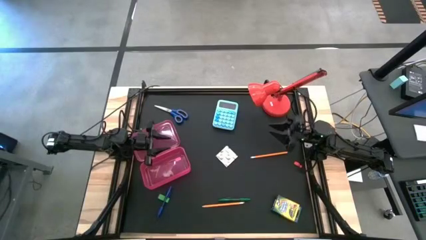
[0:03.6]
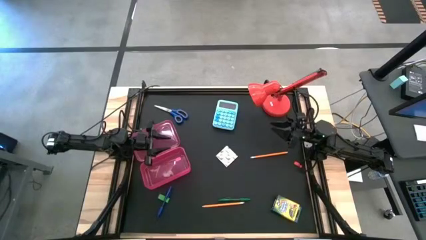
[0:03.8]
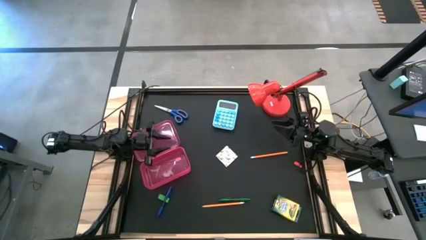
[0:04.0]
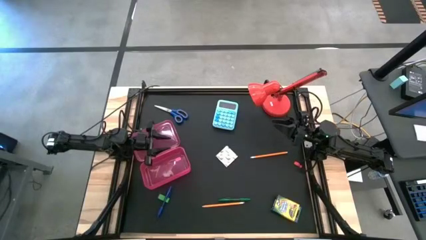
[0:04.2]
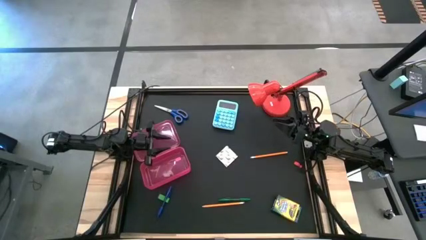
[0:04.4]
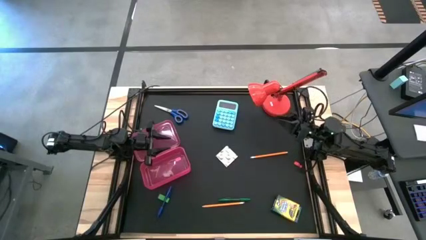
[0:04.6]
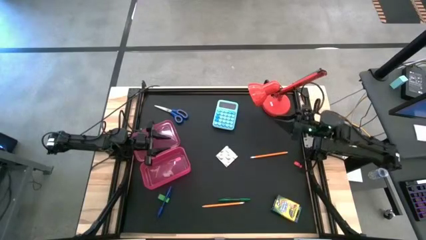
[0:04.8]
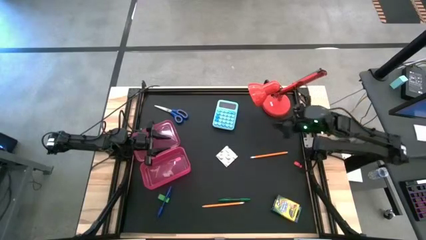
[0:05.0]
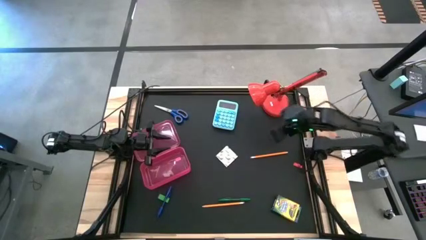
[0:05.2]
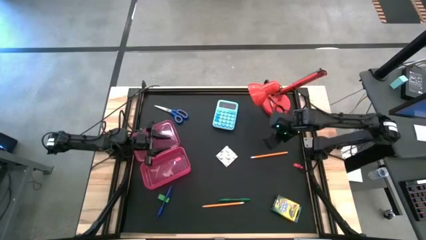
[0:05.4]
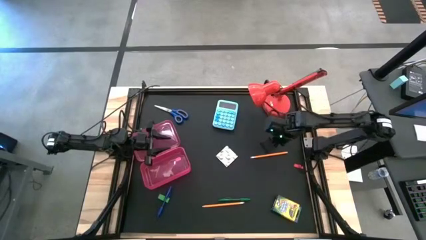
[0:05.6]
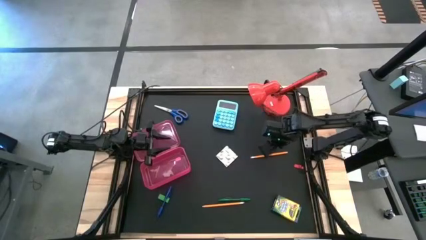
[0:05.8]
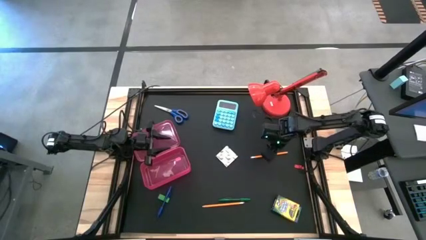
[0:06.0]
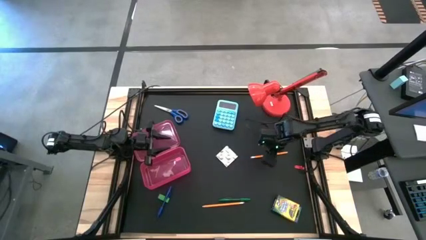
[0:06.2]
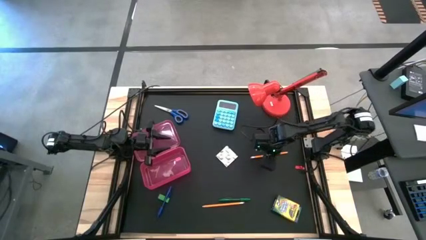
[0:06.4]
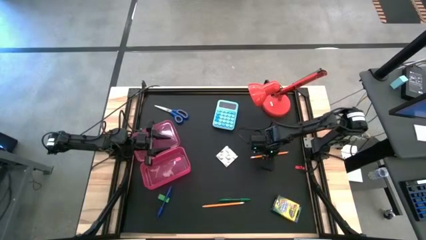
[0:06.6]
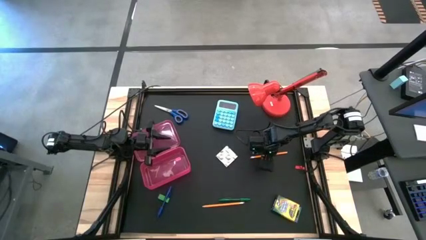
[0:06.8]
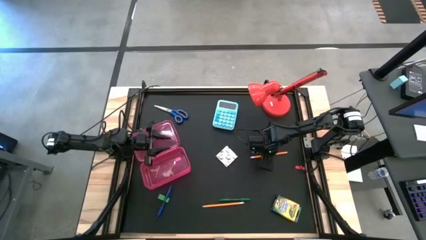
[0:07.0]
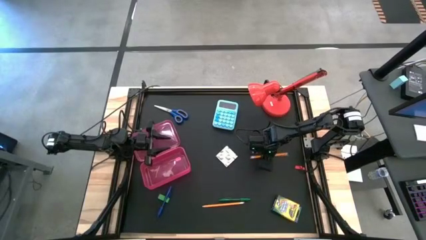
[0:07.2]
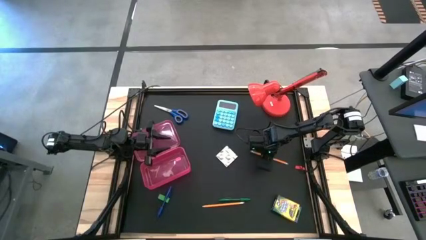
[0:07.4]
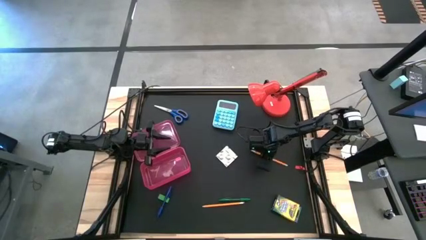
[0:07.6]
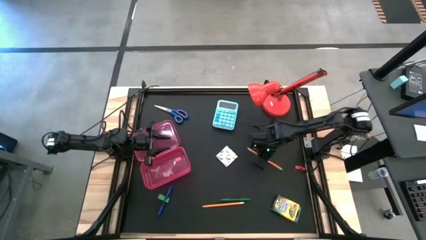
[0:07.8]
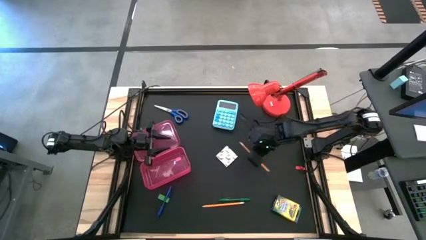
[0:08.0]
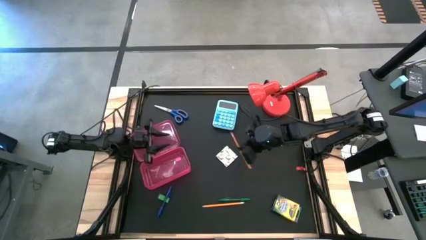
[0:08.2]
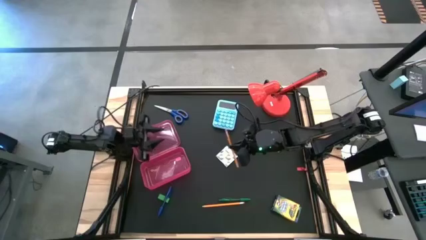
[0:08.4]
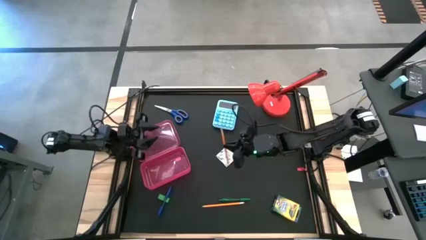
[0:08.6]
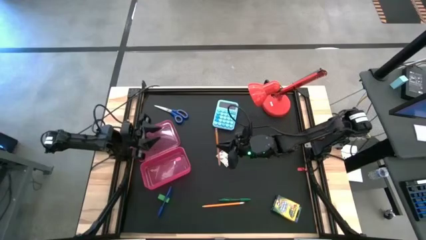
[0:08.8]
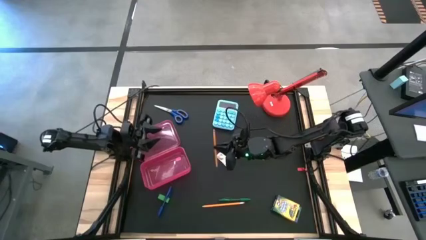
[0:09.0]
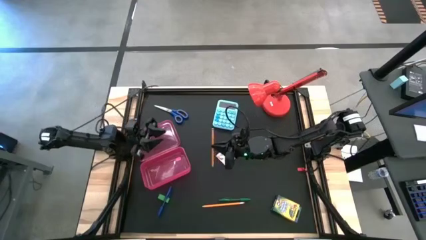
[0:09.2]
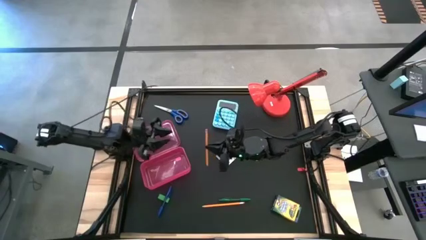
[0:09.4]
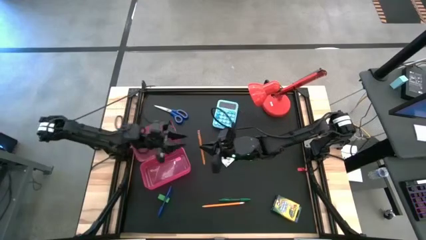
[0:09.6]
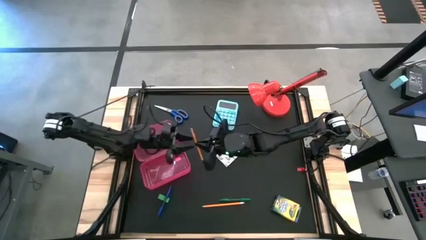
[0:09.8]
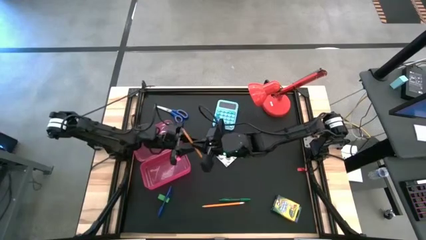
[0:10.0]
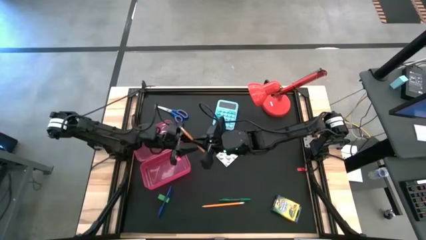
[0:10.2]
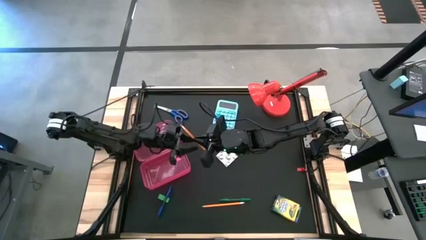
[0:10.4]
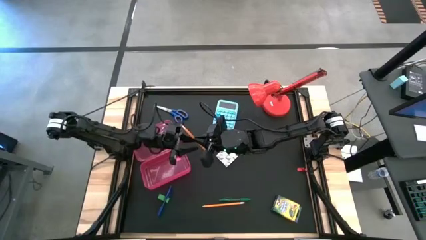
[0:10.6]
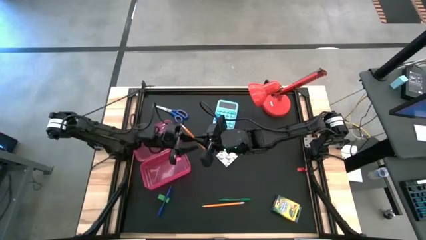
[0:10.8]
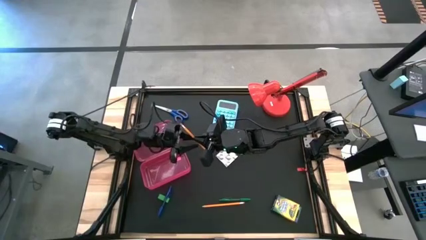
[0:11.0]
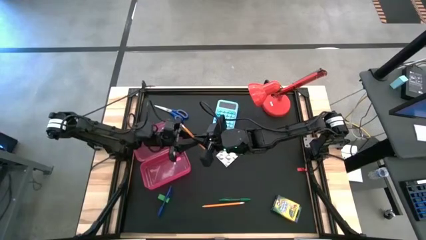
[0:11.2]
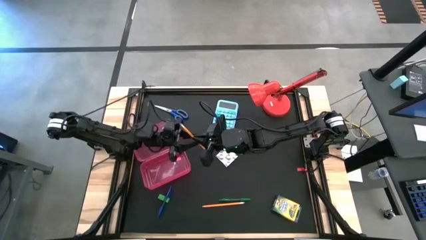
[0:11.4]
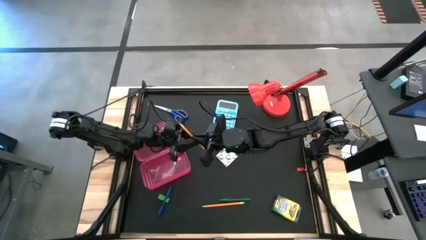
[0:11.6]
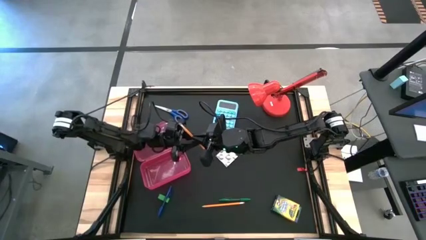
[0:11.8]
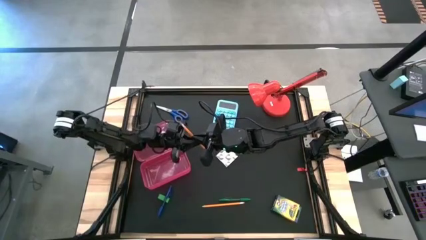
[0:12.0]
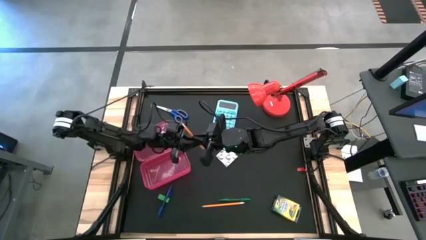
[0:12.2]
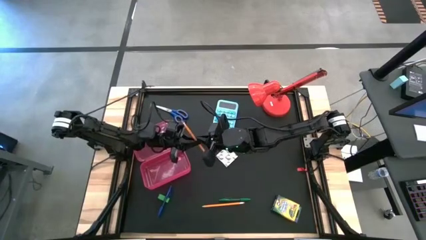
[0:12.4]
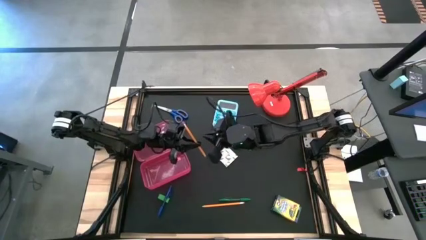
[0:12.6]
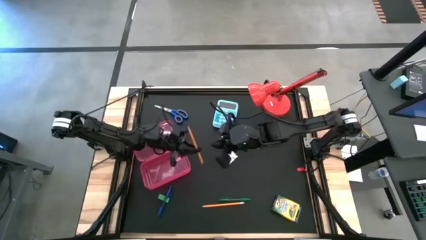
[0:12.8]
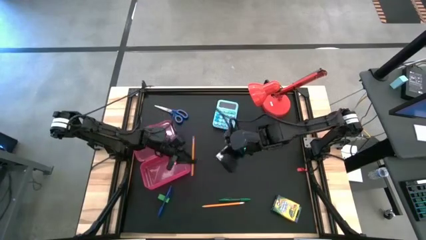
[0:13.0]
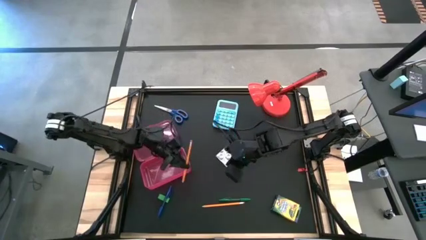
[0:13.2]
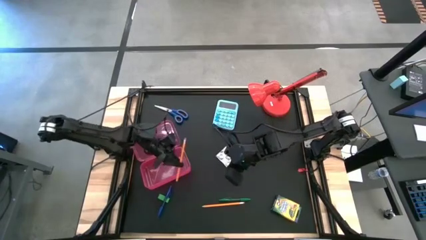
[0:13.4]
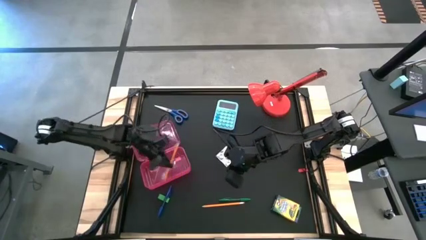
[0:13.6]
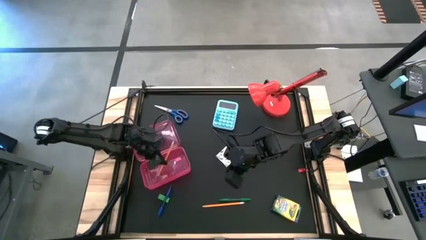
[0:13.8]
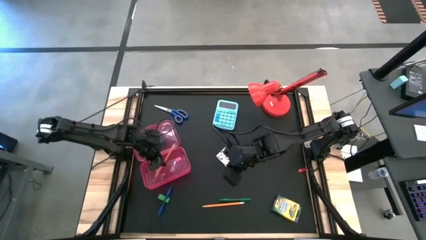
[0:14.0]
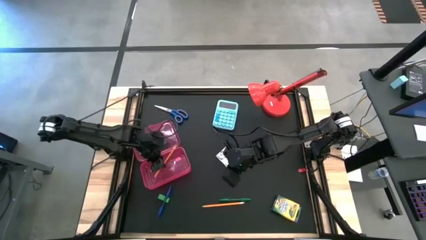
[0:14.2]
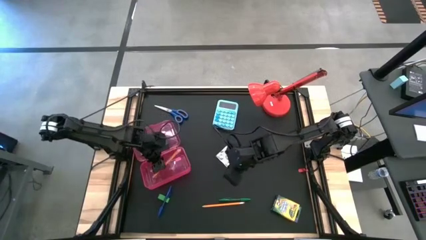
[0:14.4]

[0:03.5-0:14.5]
Task: Pack school essentials
Put the top orange pencil into the red supply box
